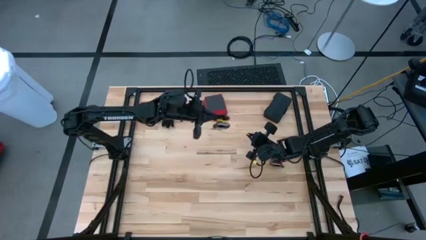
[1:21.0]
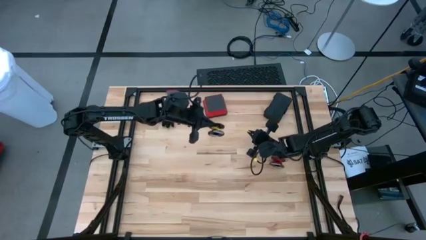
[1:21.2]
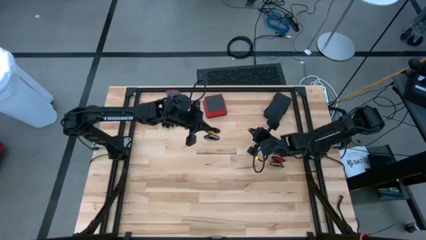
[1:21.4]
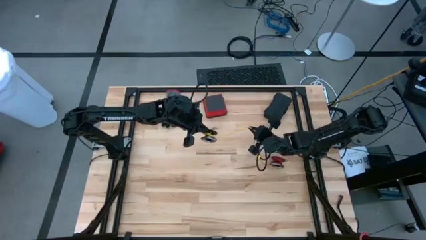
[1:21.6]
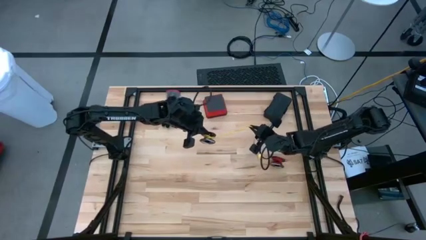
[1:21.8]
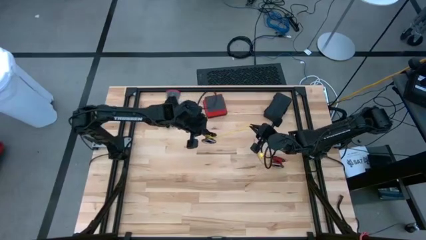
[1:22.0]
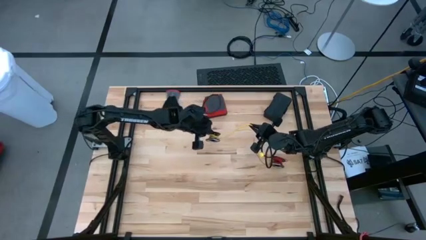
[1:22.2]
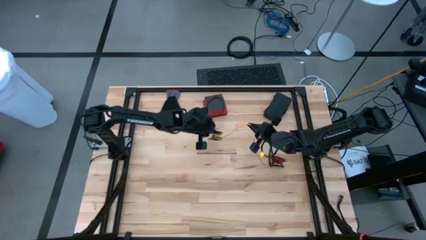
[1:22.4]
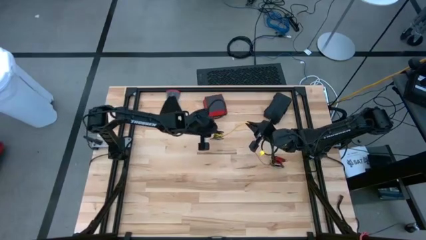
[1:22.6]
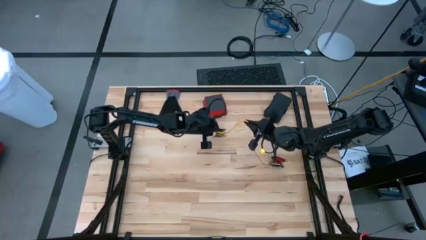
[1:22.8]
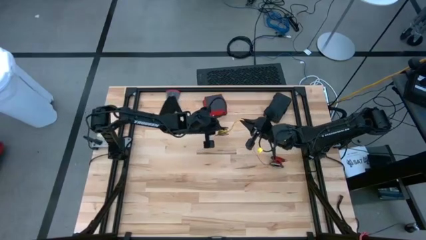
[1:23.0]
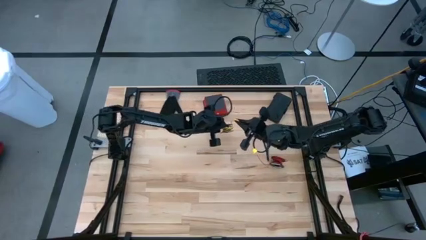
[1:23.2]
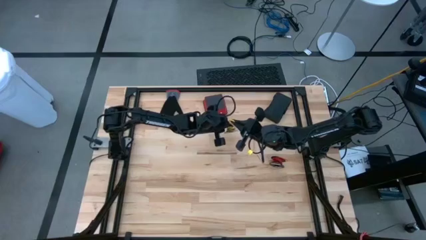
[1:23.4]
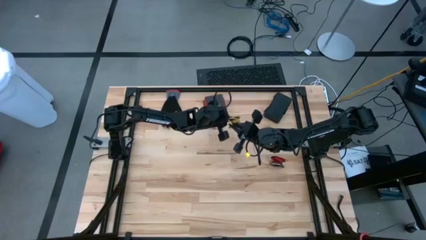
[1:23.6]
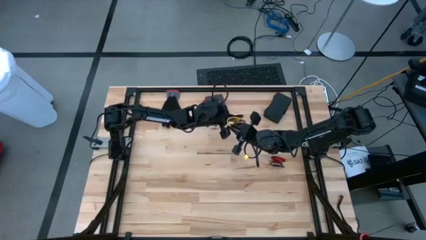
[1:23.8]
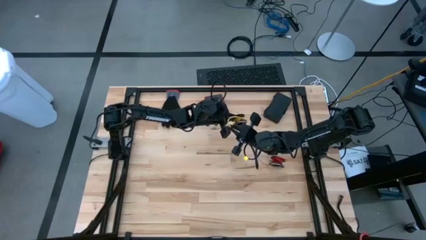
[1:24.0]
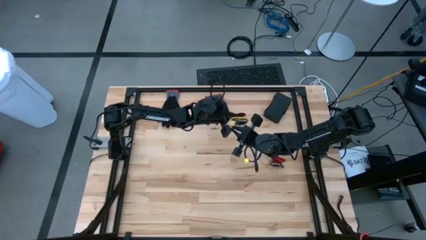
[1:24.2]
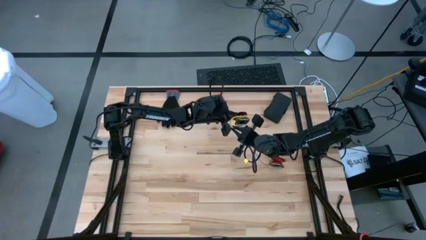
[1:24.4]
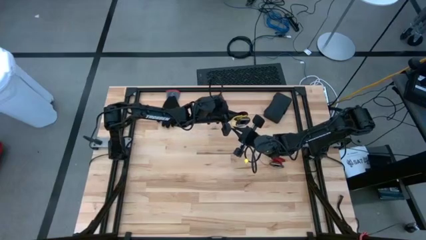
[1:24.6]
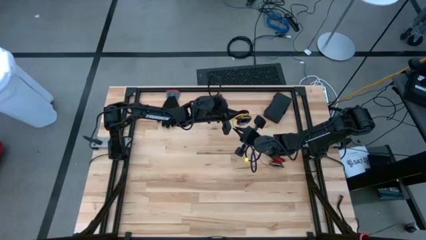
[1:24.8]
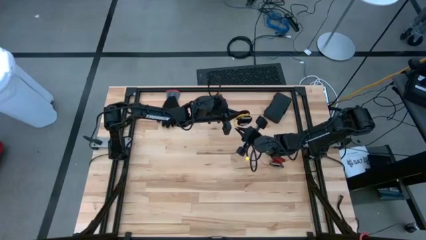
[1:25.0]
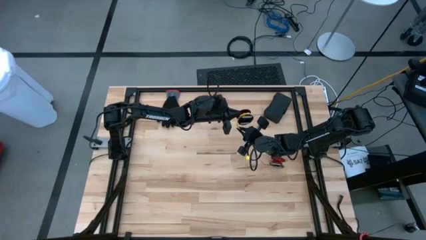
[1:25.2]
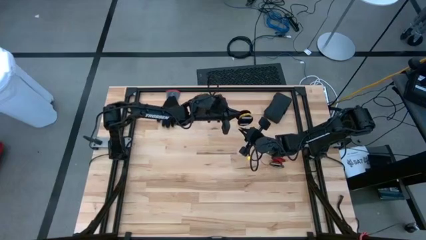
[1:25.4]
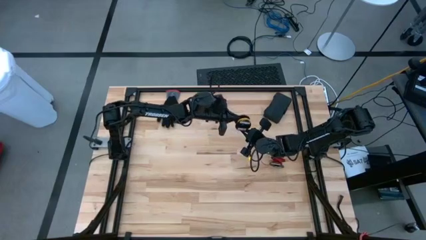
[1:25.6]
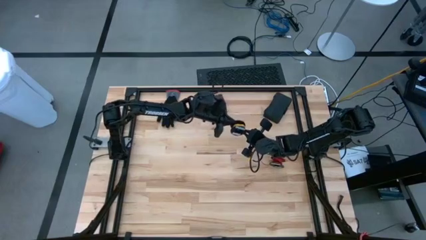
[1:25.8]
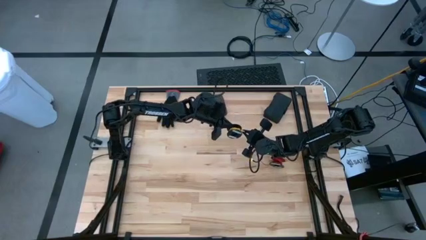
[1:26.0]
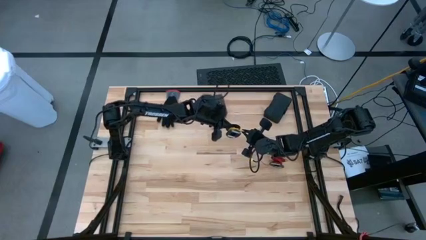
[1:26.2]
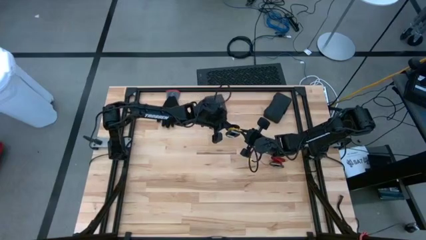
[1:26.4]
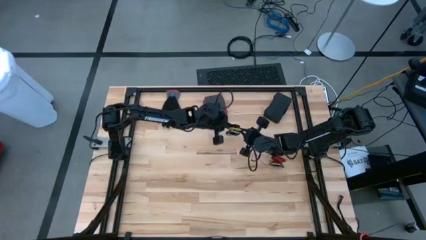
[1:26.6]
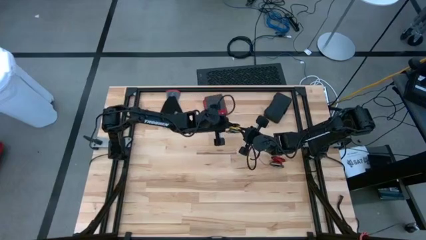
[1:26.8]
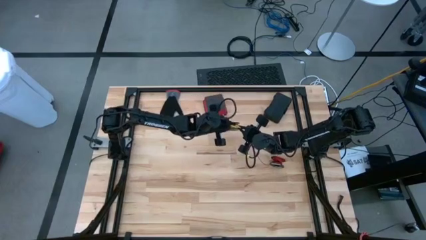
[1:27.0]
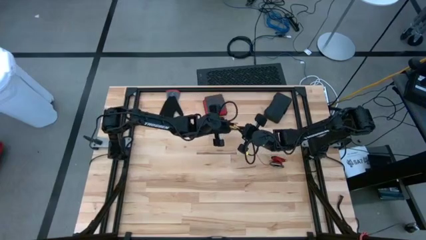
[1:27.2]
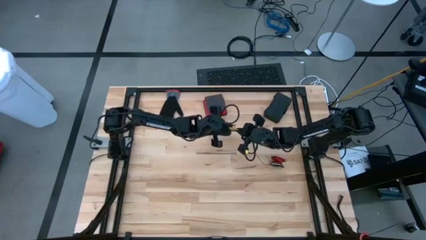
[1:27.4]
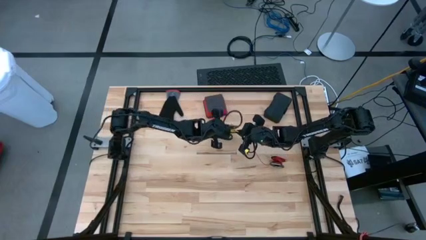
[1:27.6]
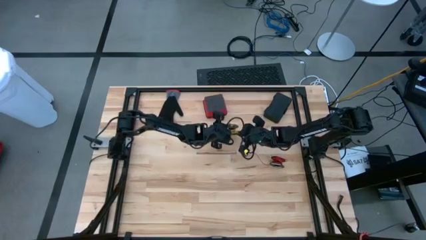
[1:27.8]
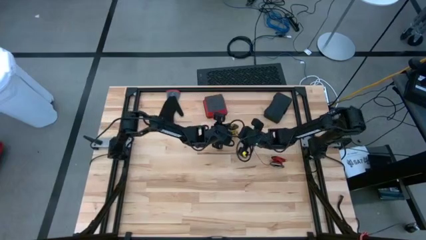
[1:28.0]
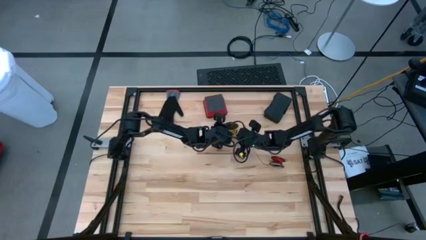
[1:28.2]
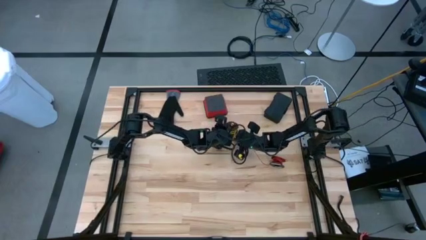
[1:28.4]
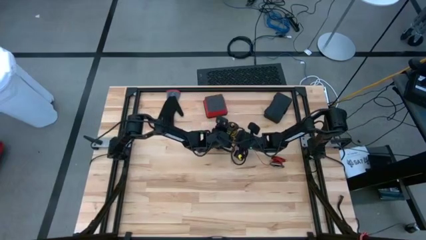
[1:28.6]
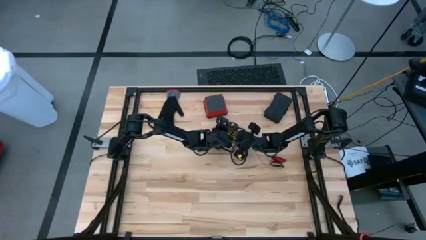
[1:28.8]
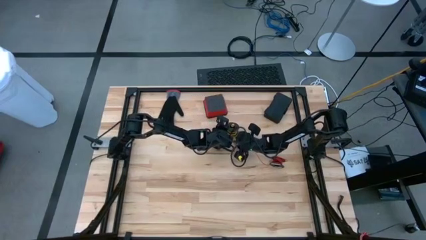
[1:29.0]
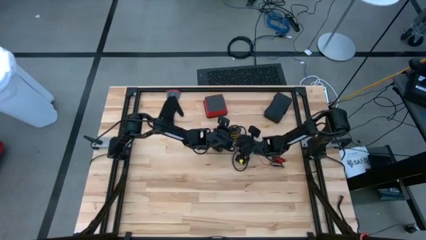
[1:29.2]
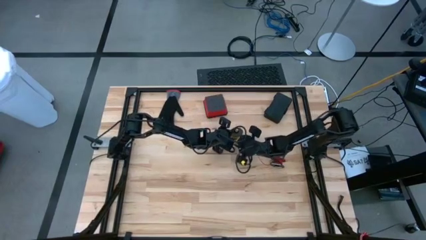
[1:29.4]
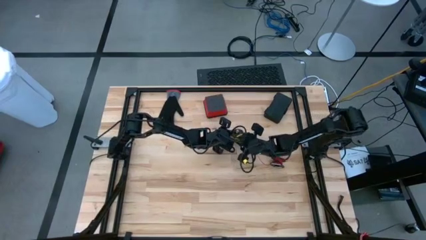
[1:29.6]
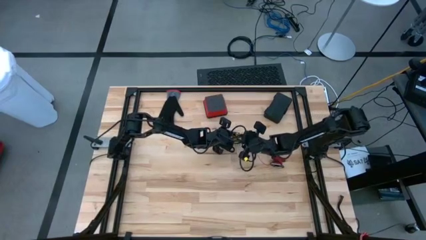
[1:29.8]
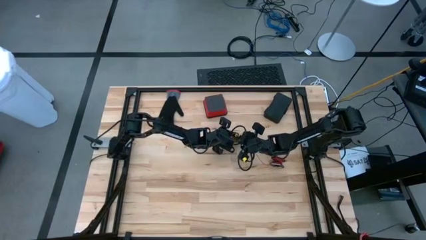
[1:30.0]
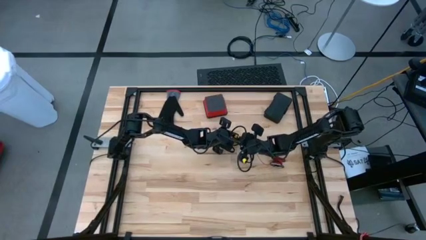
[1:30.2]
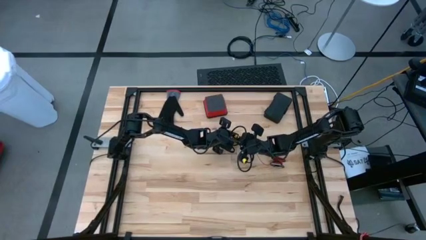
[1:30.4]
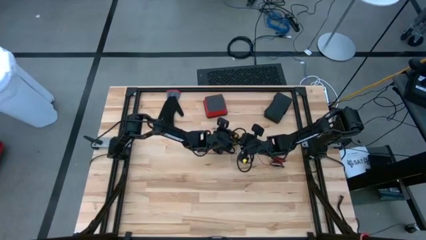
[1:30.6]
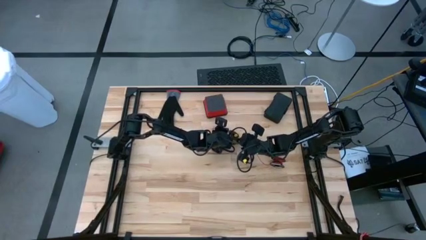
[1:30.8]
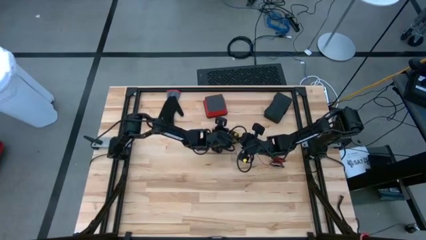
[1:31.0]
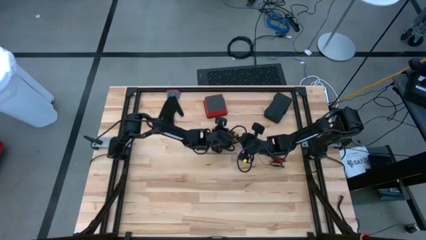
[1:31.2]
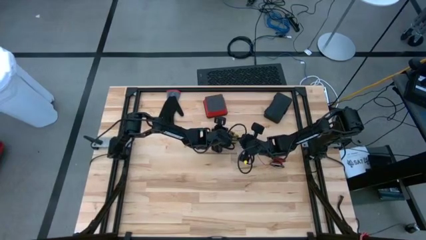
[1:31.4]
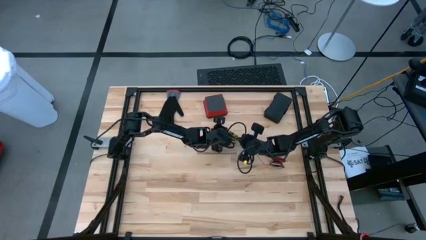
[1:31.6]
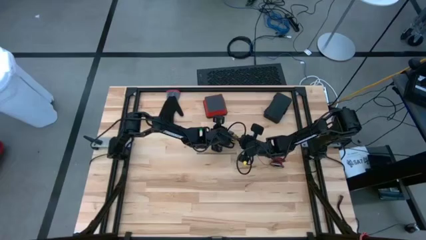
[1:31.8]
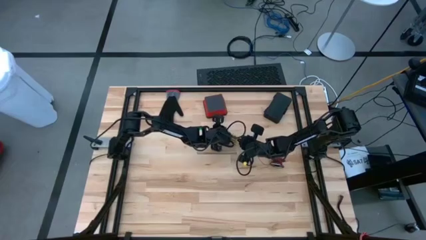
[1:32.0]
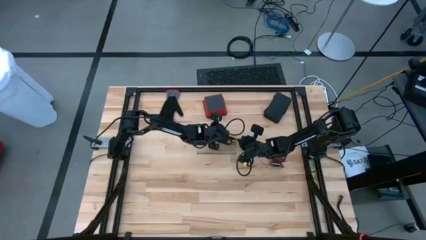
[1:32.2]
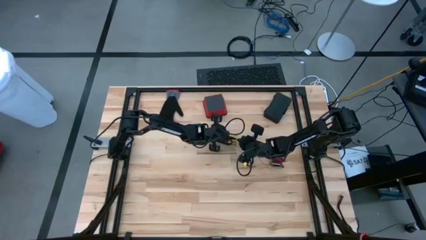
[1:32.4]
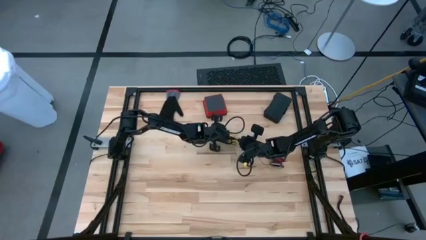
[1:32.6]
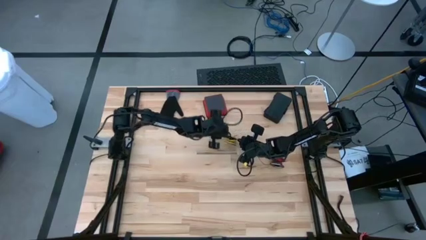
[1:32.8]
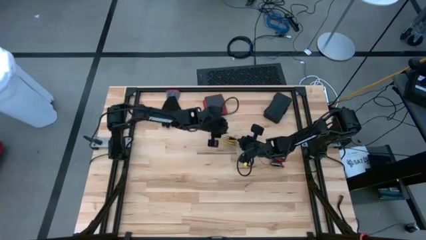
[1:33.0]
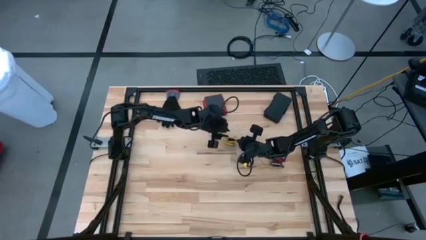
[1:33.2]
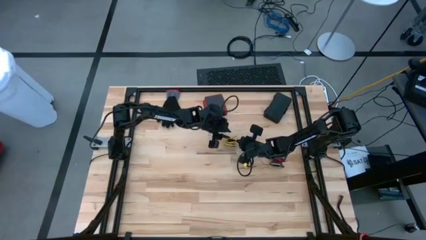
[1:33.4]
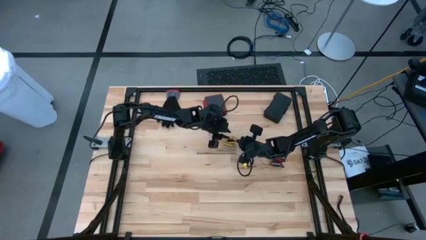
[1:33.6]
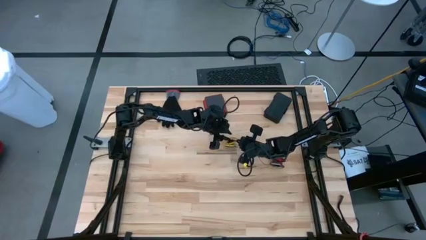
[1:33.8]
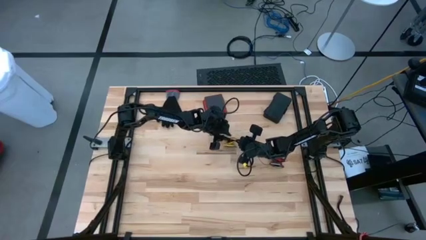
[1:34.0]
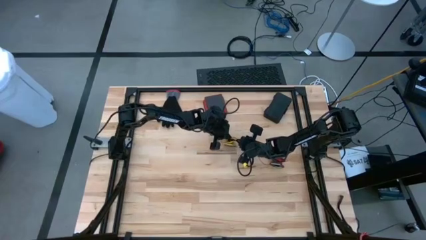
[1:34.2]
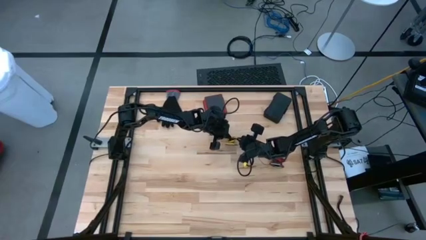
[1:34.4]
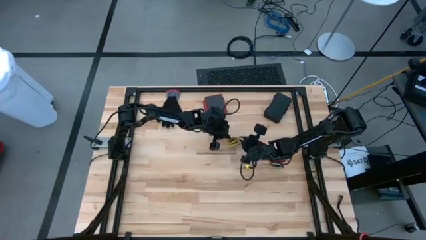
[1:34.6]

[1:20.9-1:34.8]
Task: Coil cords
Coil the yellow wire onto the spool

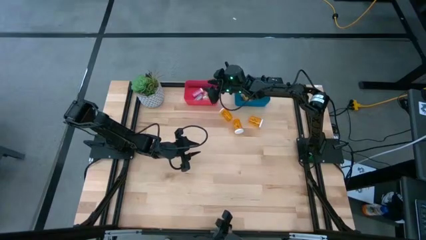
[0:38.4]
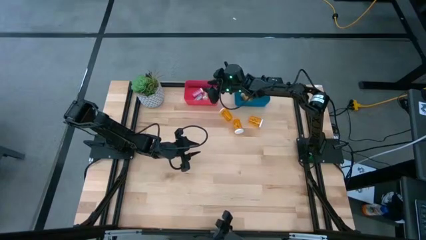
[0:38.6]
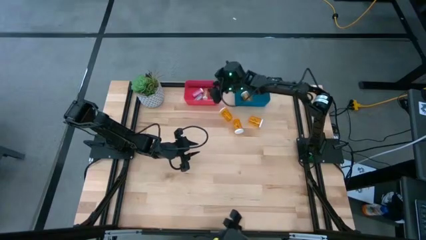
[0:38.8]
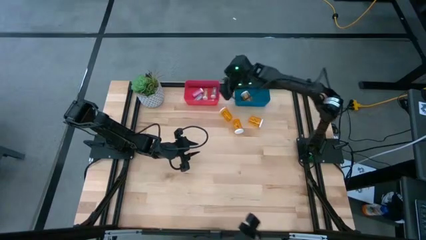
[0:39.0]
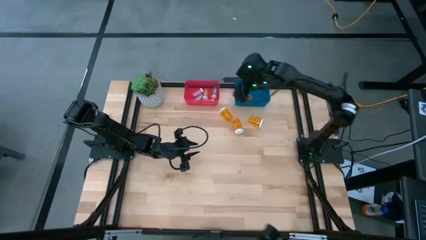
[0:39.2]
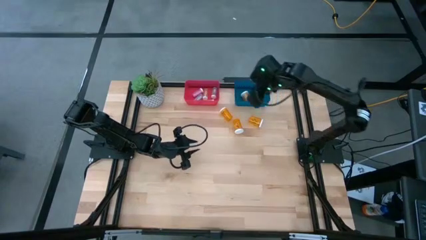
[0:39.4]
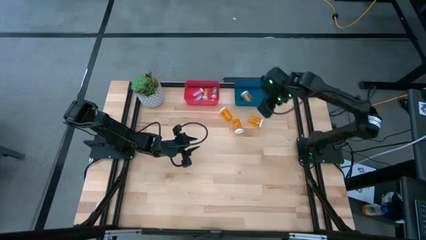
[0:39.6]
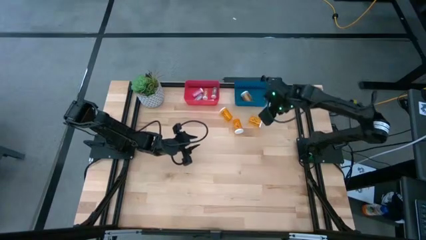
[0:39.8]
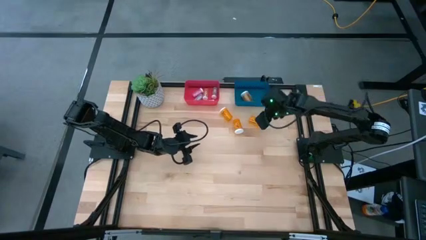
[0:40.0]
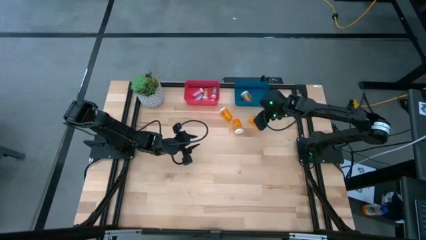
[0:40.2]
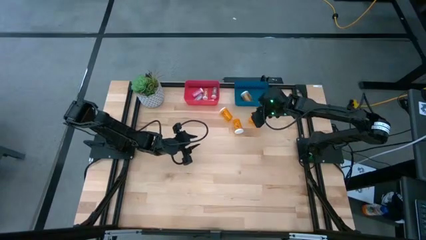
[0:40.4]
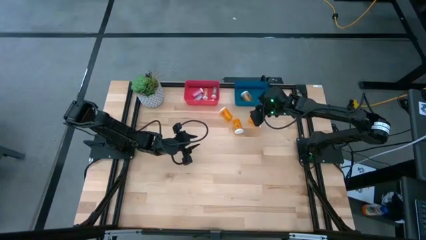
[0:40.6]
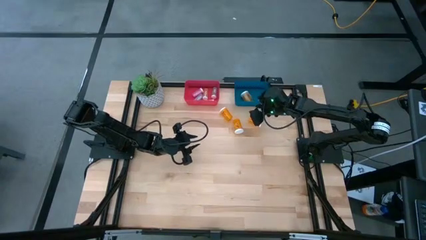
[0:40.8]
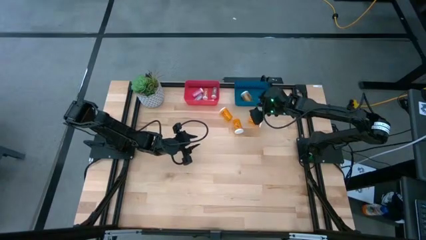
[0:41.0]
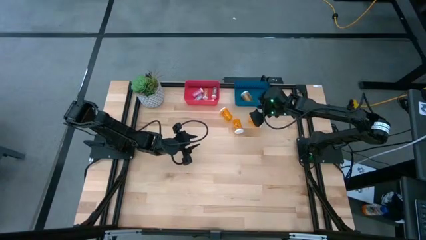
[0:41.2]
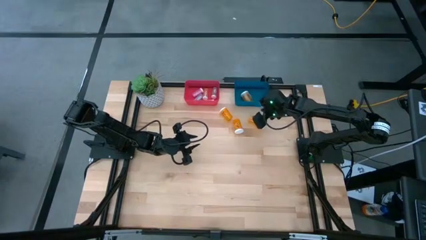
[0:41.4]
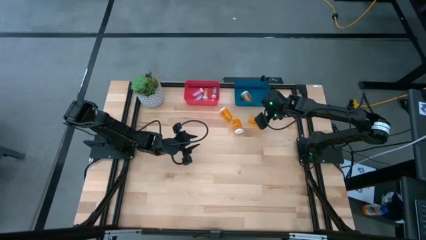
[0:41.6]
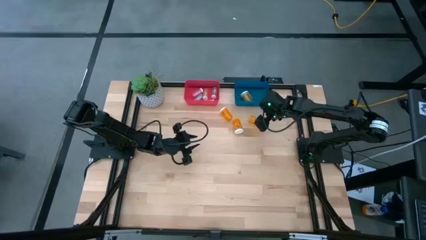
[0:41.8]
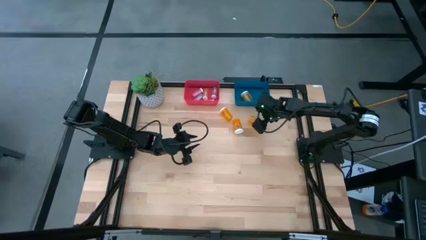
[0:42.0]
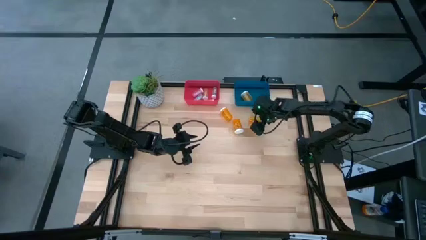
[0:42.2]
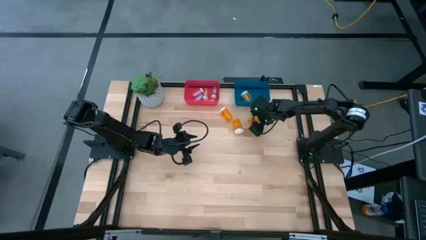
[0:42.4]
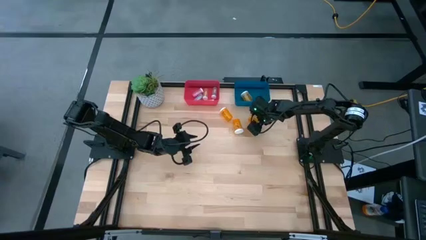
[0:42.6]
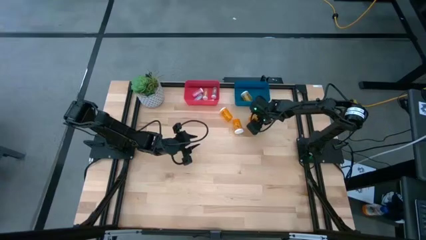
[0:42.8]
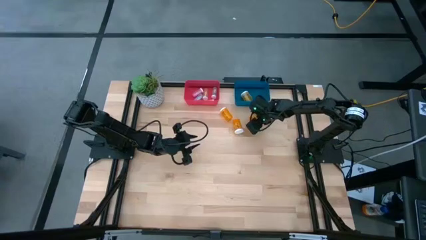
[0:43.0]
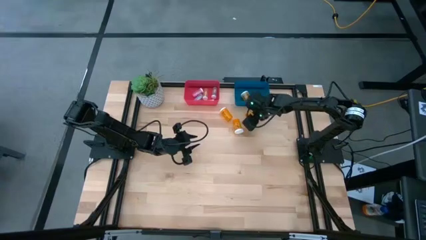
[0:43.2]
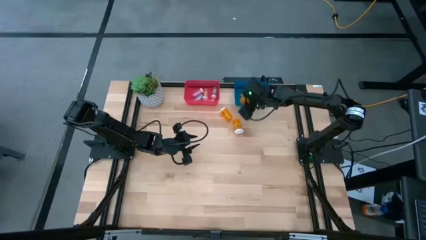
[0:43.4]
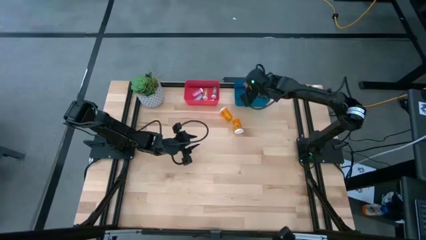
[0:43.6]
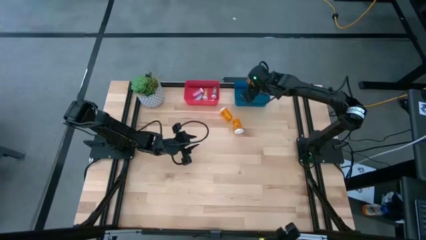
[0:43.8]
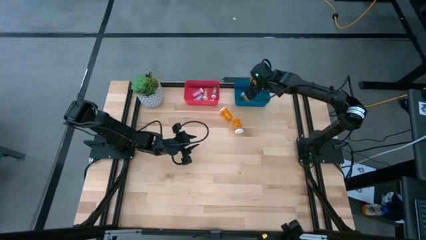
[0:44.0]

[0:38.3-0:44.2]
Task: Pick and place medicine bottles into bin by pill shape (circle, oval)
Put the orange pill bottle into the blue bin
